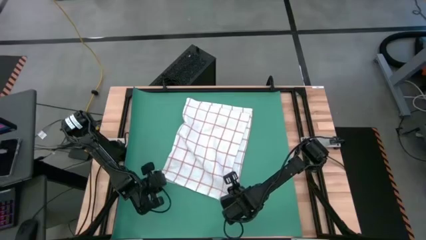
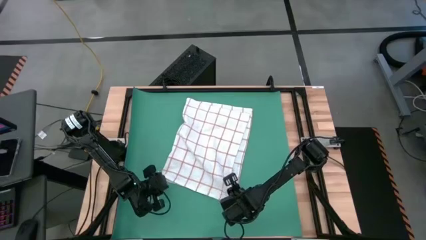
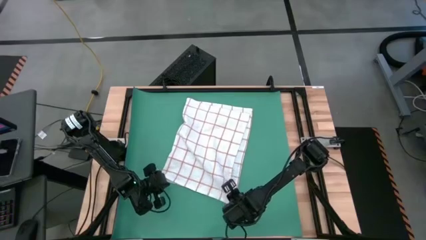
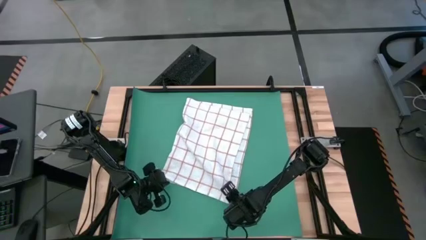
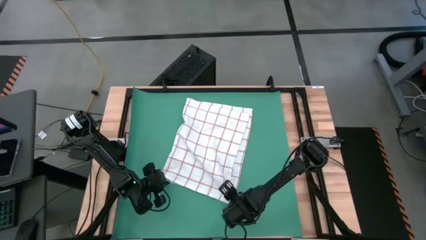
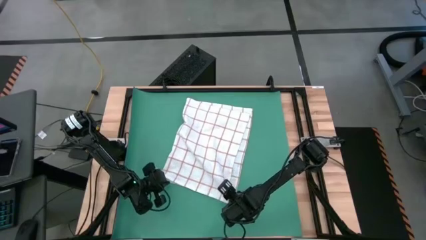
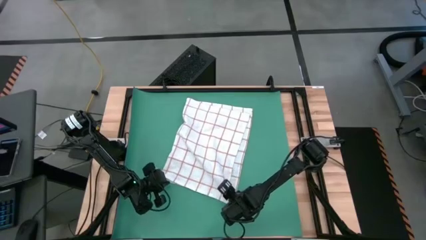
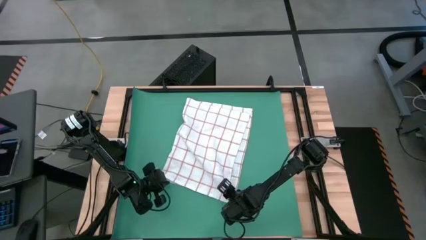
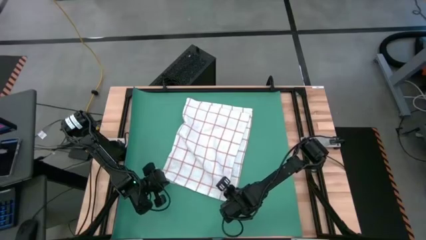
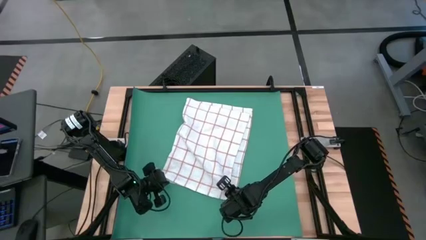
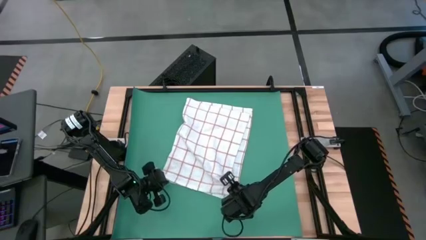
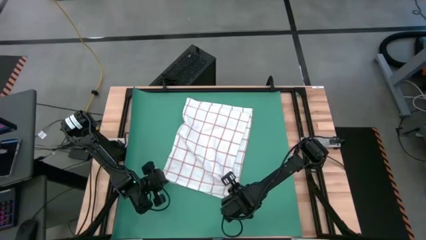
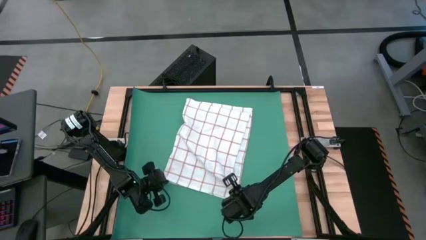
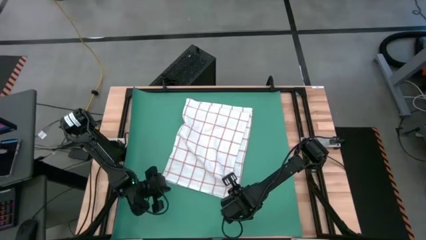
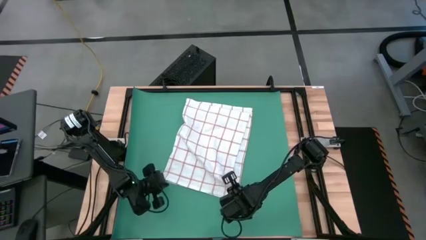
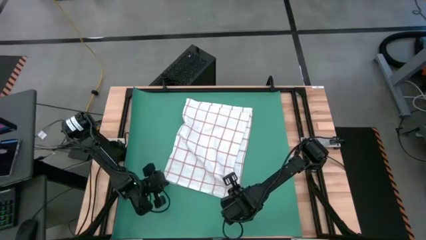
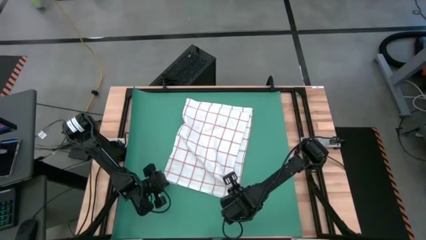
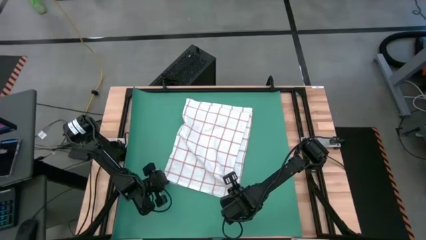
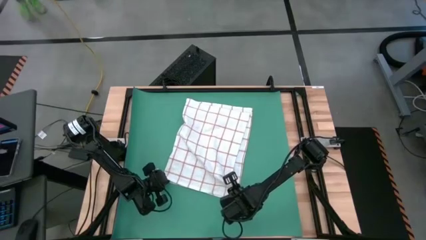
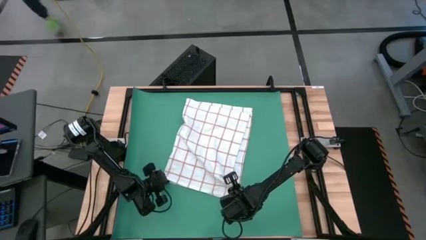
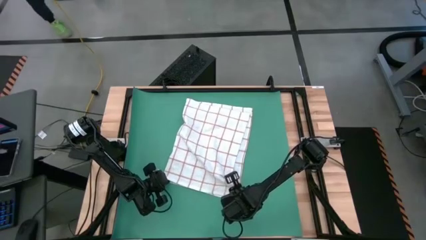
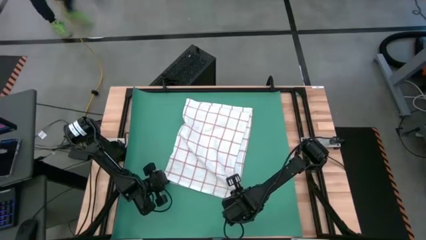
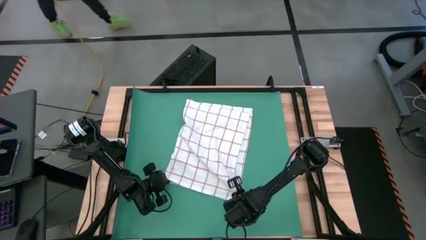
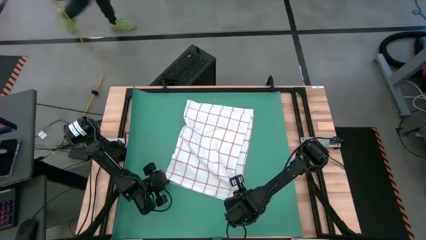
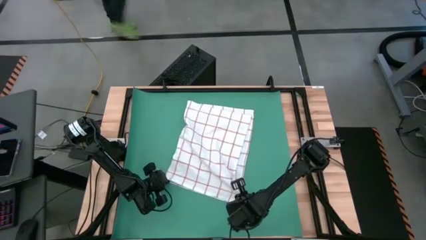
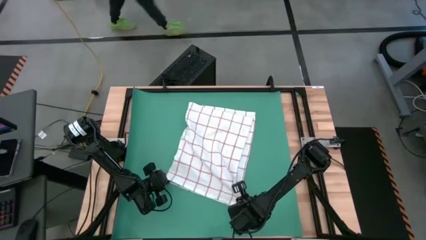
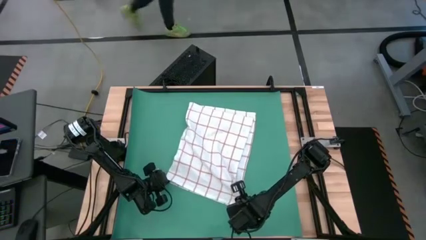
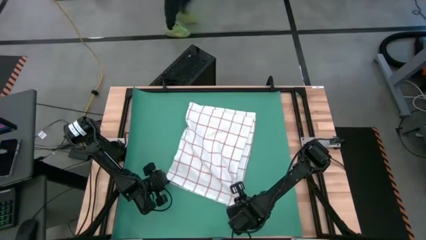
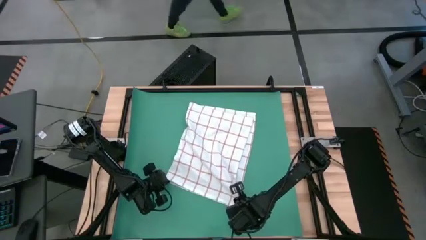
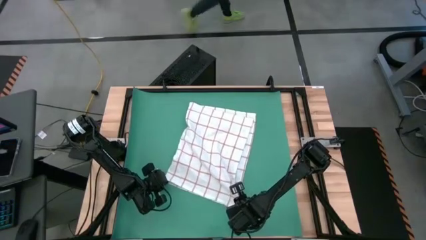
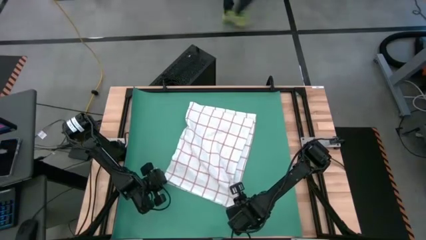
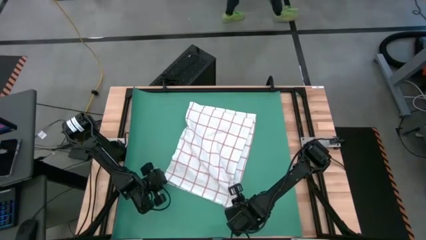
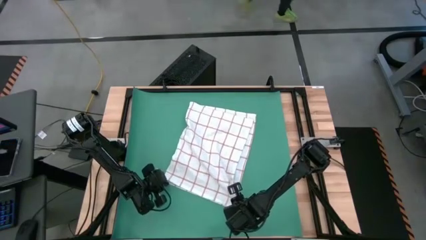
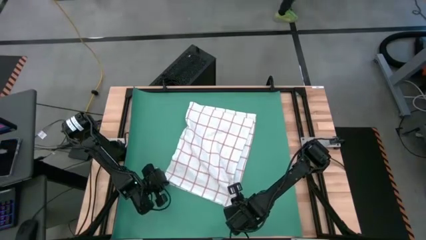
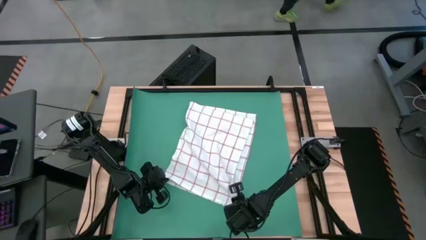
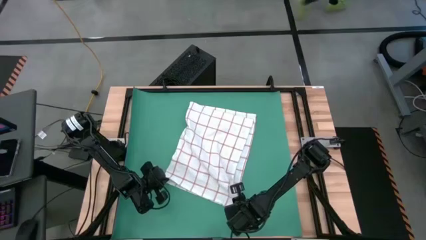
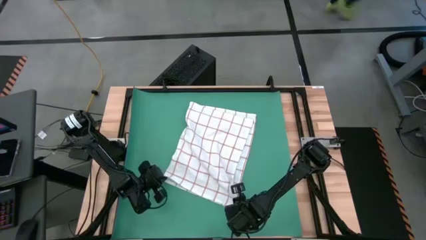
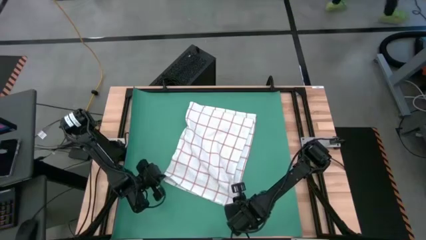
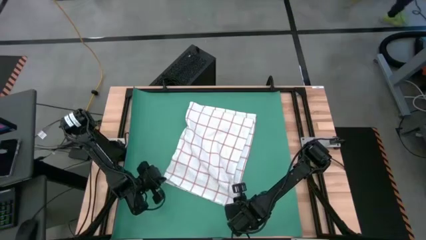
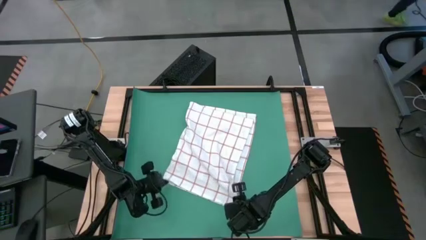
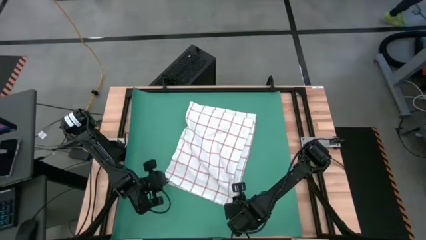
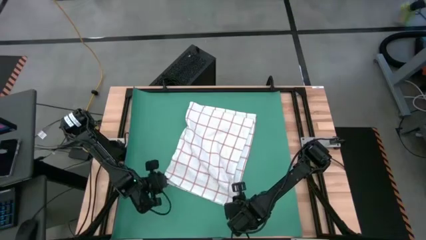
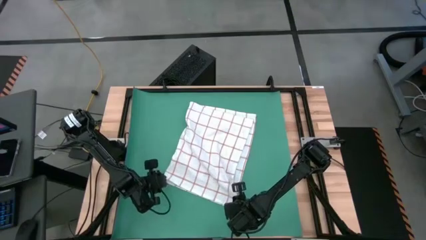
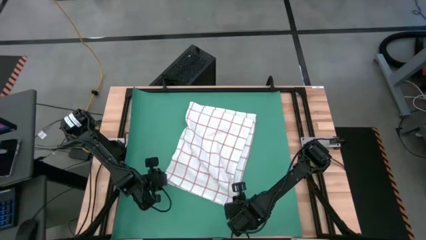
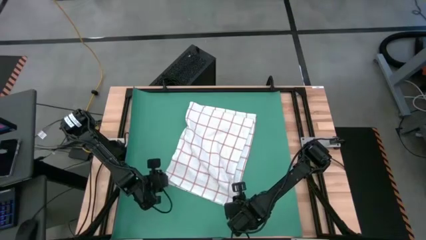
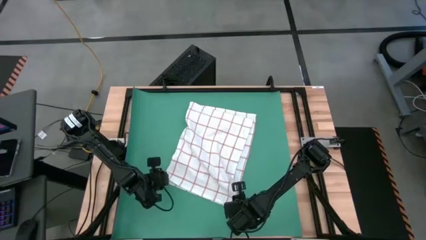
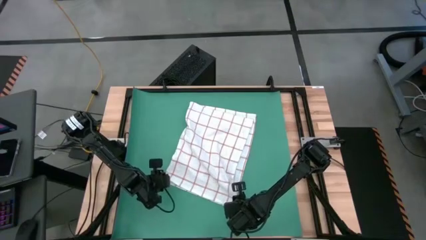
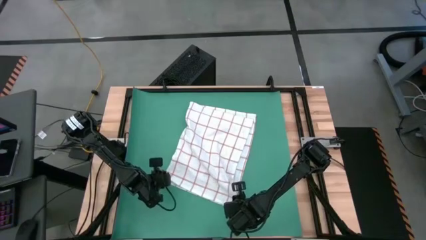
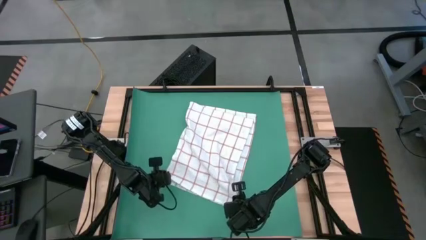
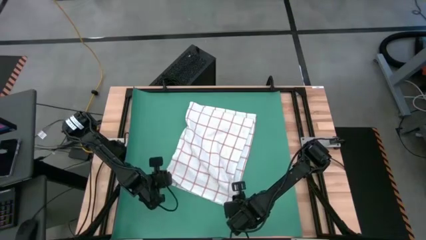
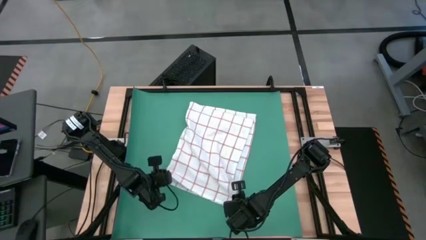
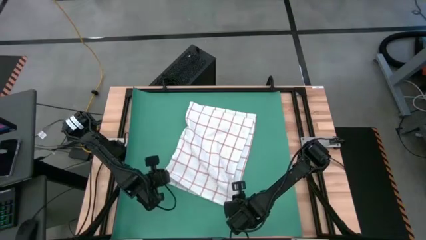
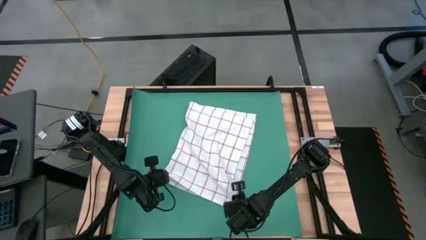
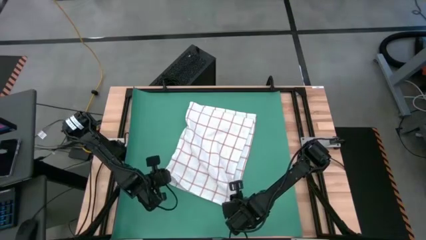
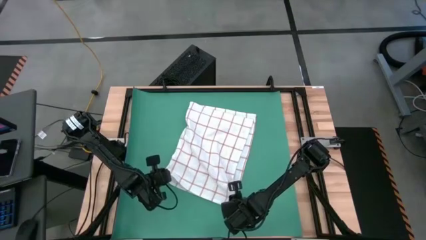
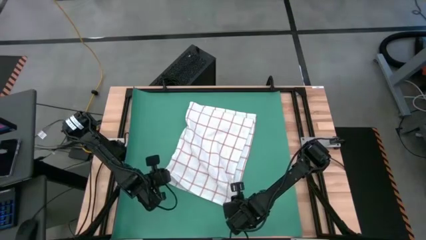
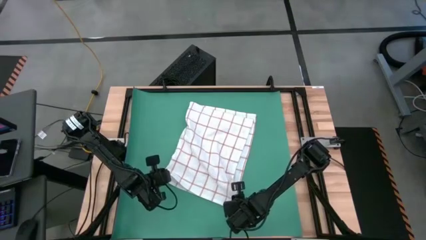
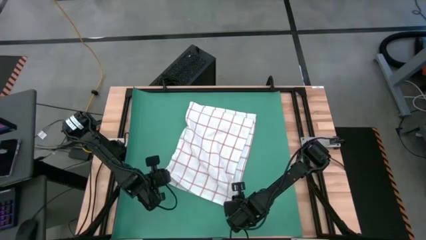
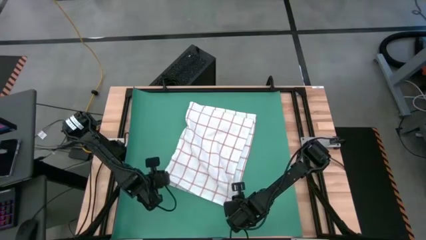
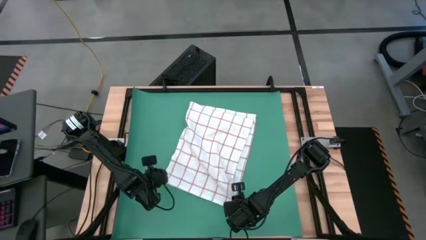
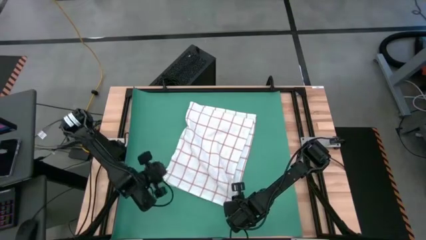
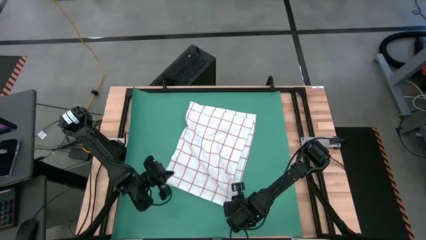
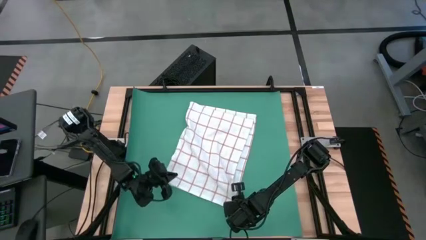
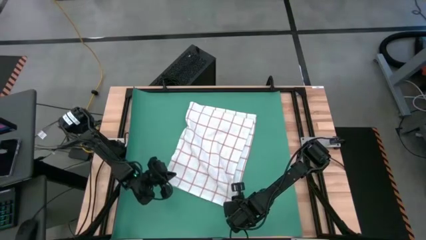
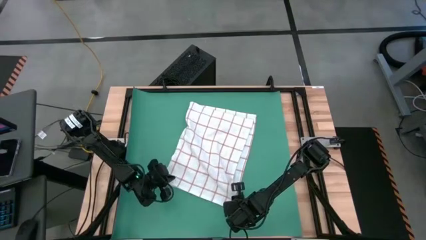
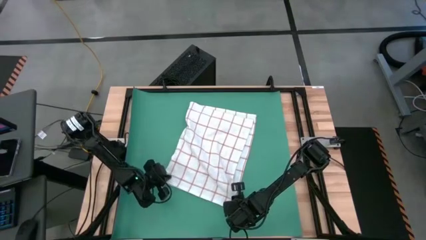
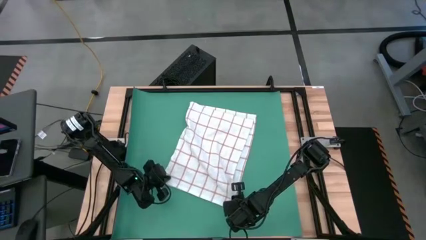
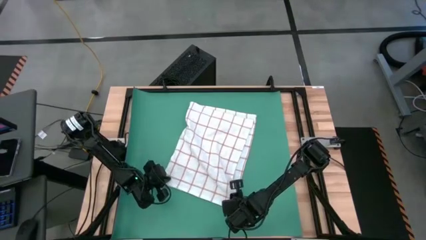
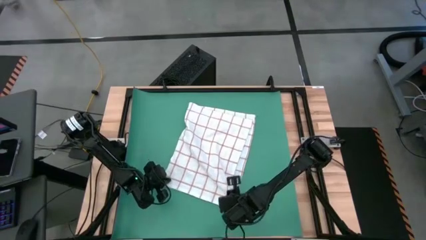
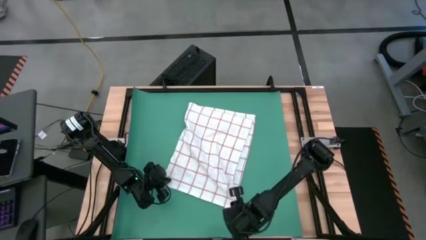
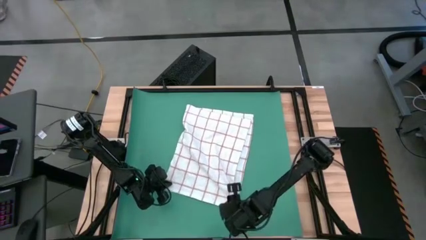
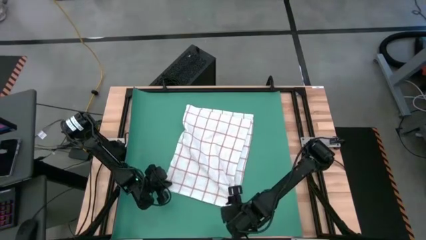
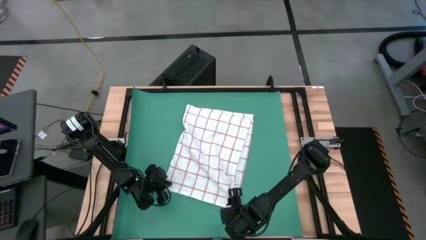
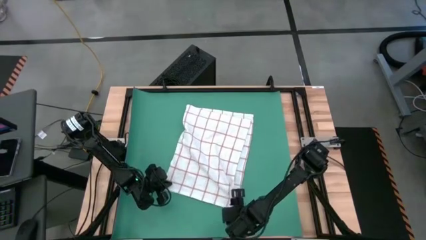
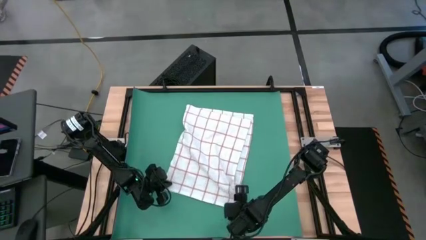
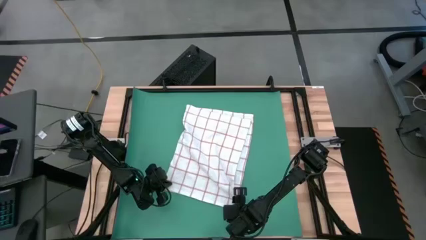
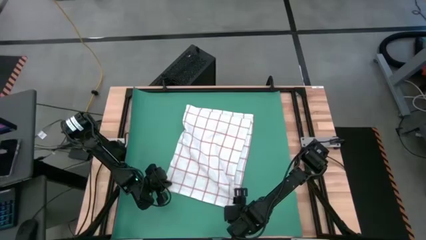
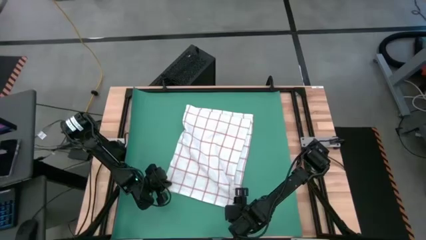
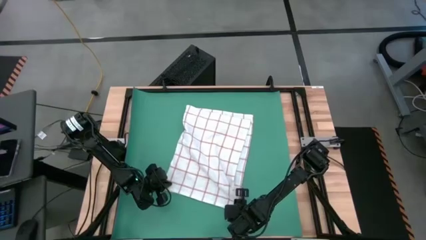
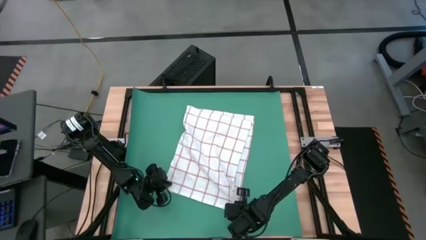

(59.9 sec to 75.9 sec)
Task: Roll towel
Roll the white stripe towel
